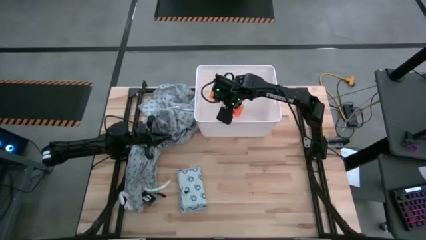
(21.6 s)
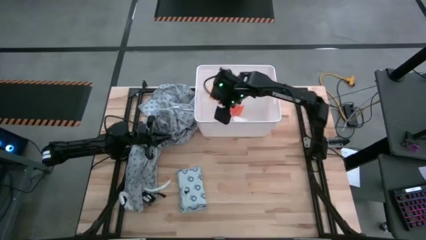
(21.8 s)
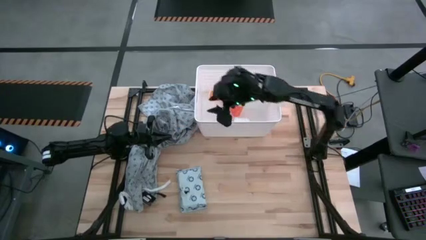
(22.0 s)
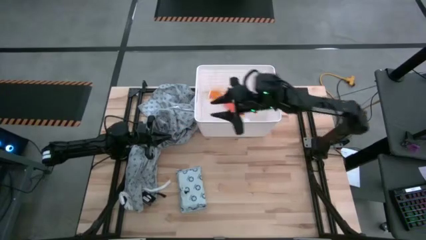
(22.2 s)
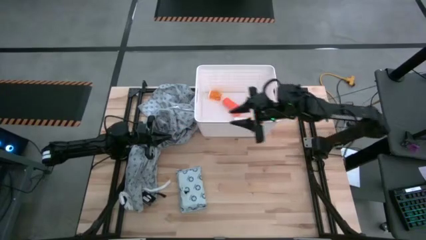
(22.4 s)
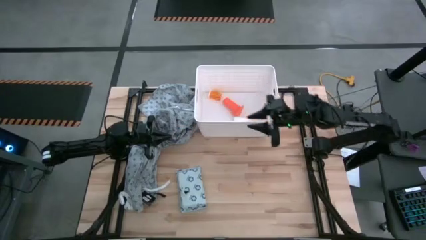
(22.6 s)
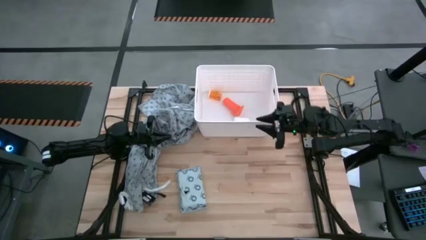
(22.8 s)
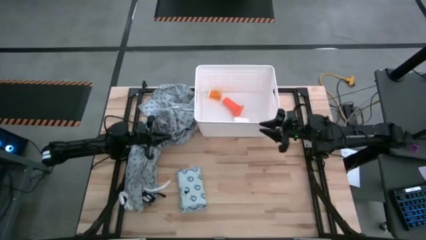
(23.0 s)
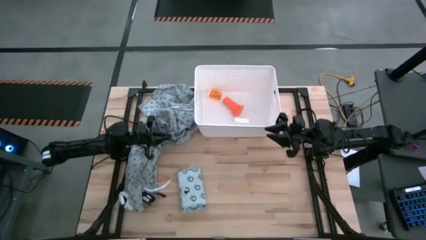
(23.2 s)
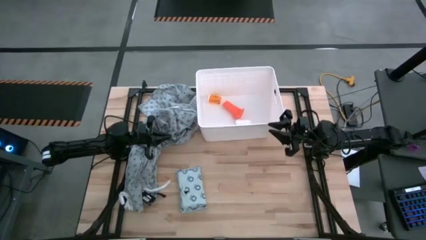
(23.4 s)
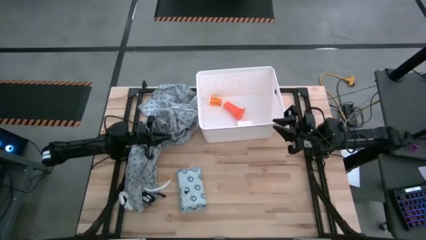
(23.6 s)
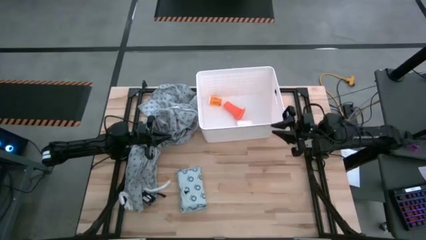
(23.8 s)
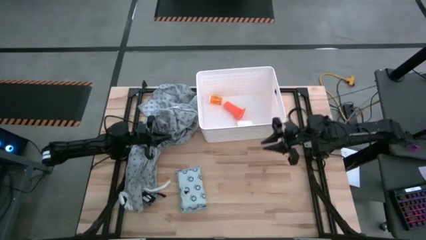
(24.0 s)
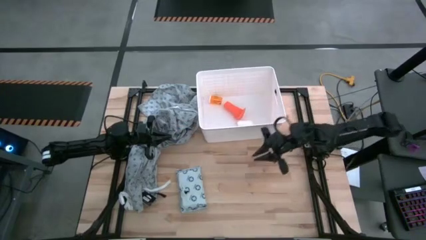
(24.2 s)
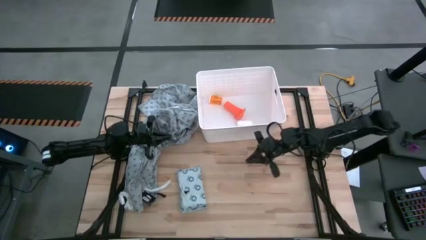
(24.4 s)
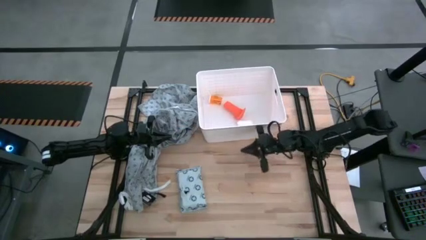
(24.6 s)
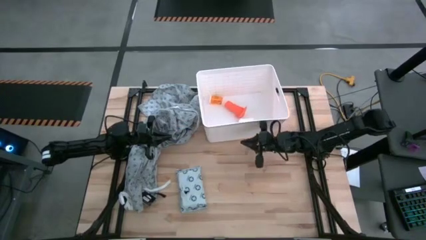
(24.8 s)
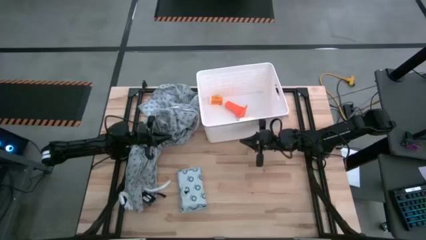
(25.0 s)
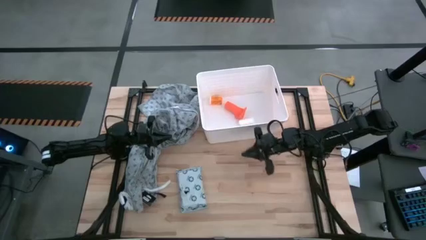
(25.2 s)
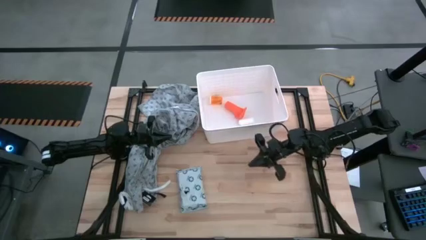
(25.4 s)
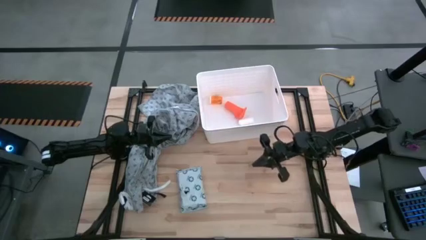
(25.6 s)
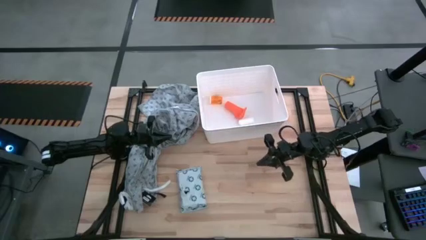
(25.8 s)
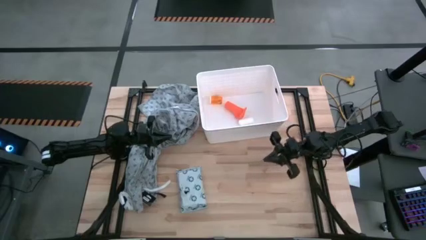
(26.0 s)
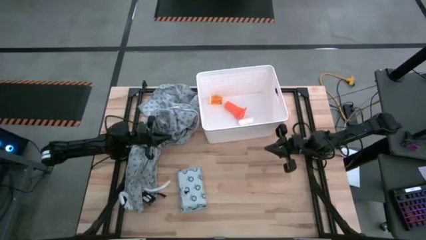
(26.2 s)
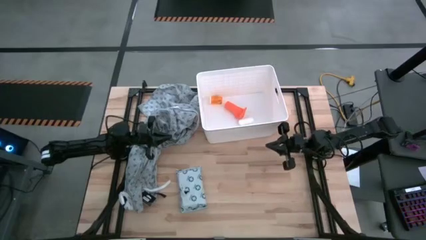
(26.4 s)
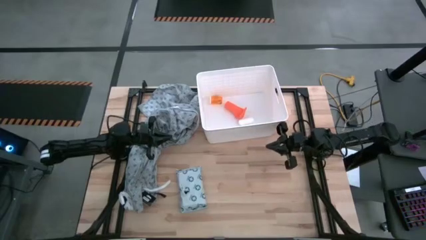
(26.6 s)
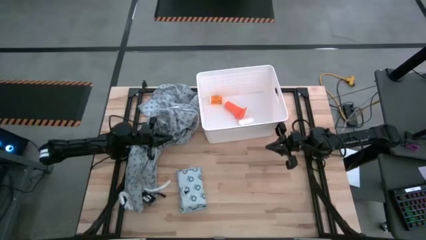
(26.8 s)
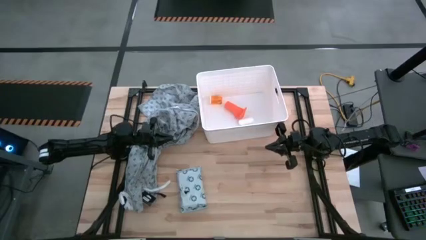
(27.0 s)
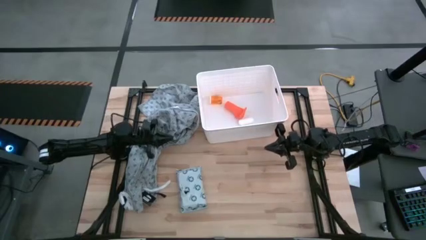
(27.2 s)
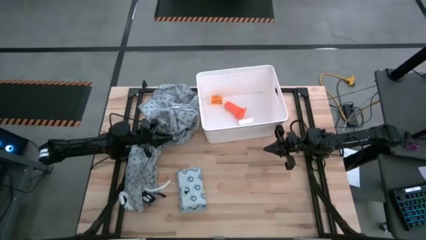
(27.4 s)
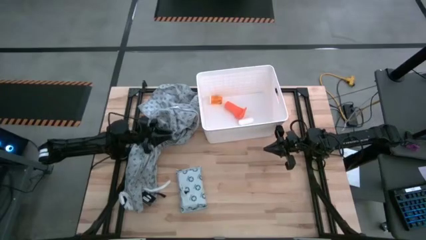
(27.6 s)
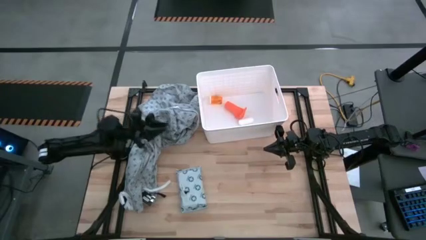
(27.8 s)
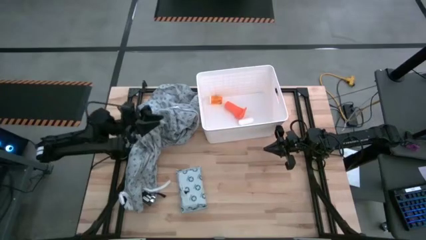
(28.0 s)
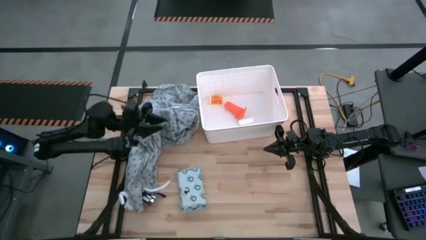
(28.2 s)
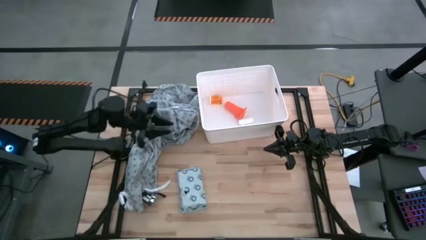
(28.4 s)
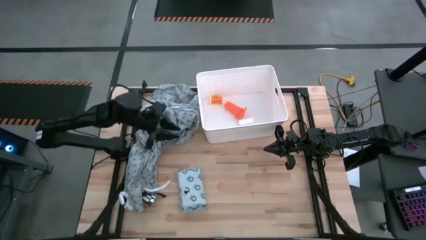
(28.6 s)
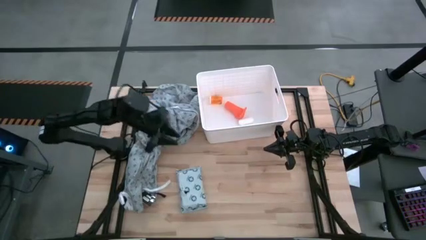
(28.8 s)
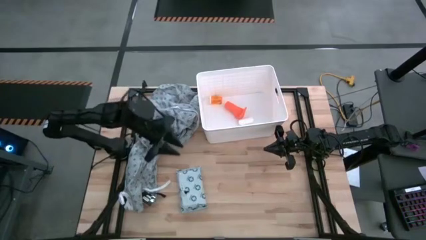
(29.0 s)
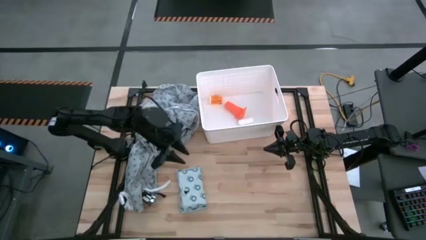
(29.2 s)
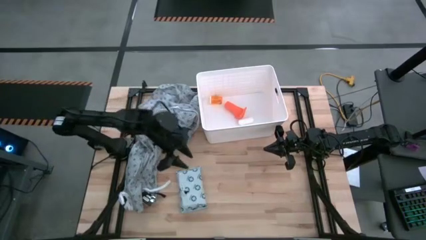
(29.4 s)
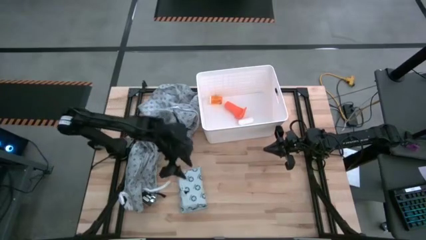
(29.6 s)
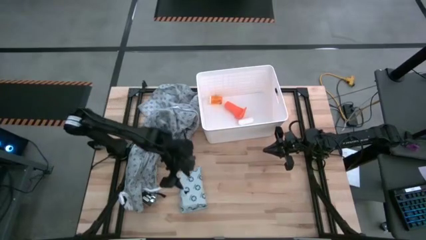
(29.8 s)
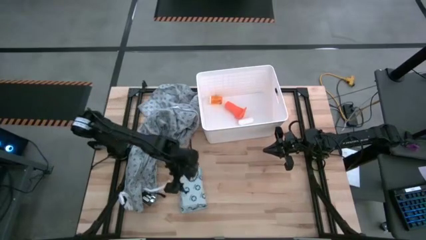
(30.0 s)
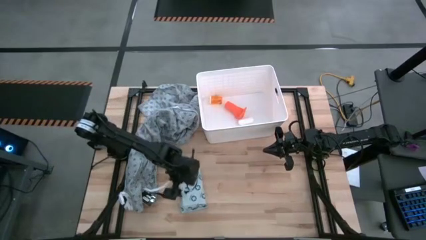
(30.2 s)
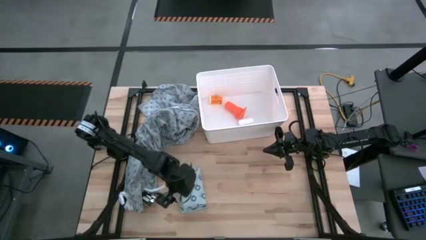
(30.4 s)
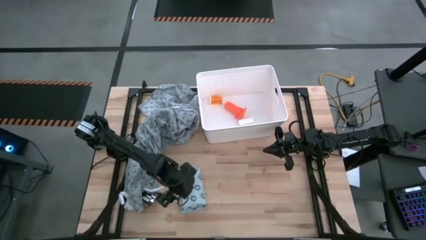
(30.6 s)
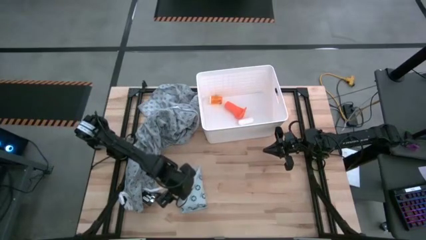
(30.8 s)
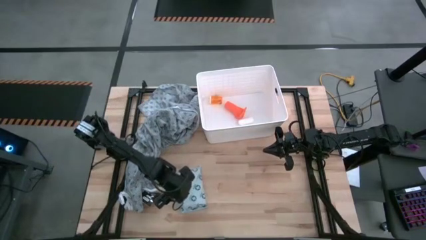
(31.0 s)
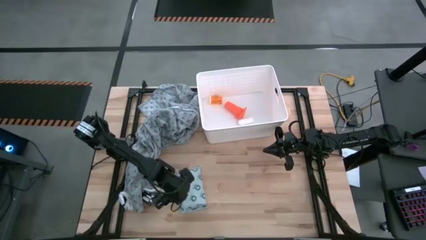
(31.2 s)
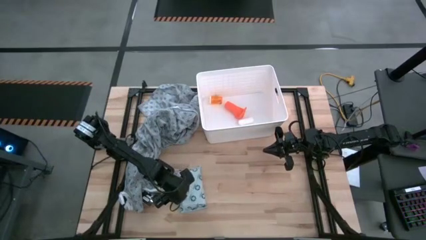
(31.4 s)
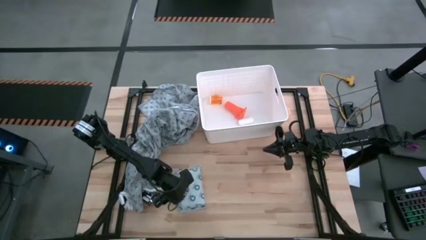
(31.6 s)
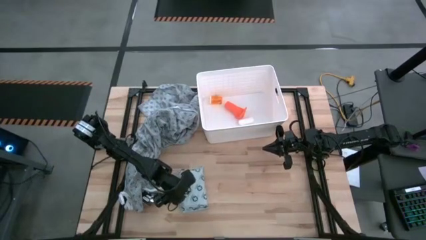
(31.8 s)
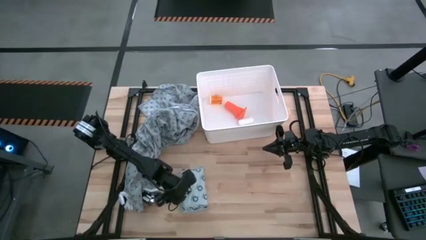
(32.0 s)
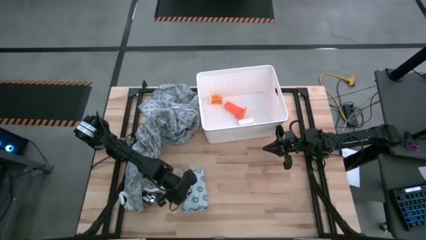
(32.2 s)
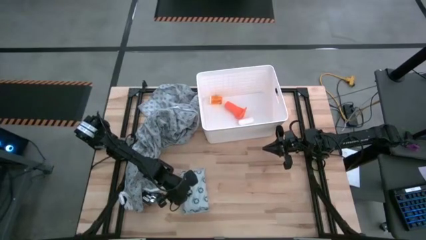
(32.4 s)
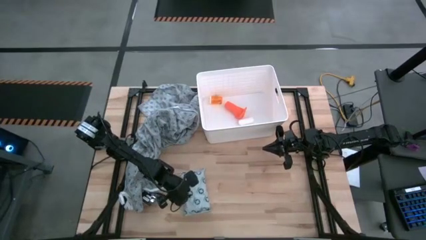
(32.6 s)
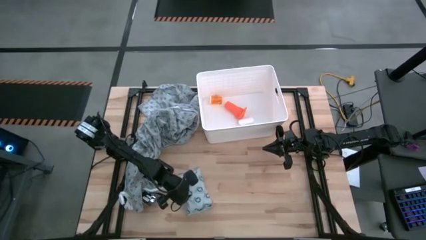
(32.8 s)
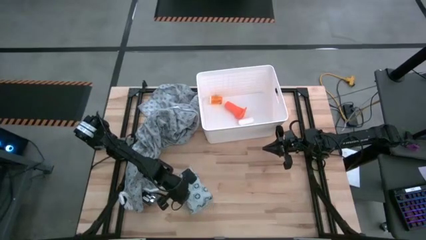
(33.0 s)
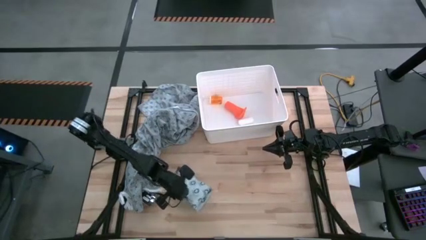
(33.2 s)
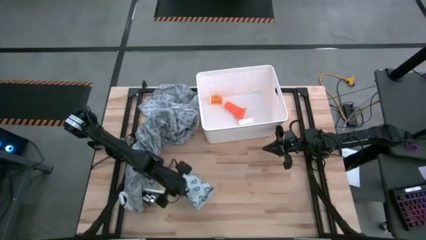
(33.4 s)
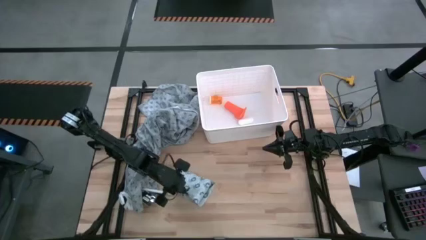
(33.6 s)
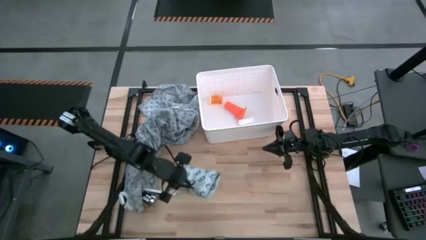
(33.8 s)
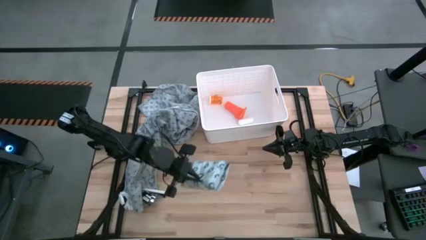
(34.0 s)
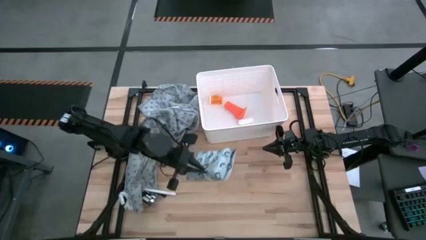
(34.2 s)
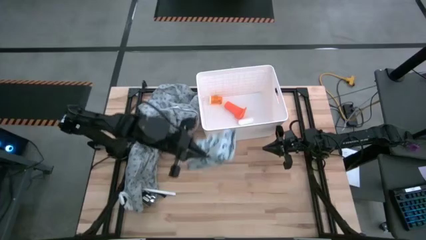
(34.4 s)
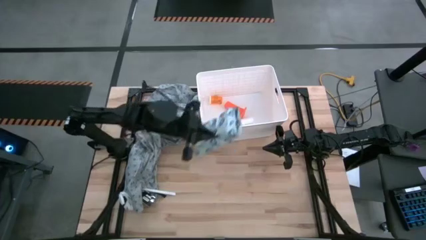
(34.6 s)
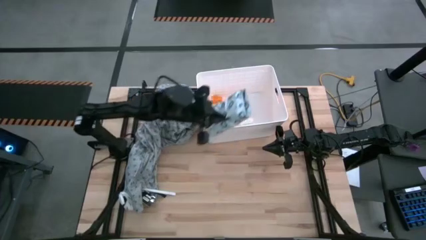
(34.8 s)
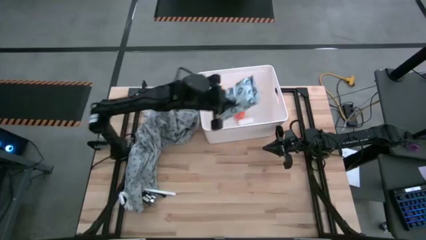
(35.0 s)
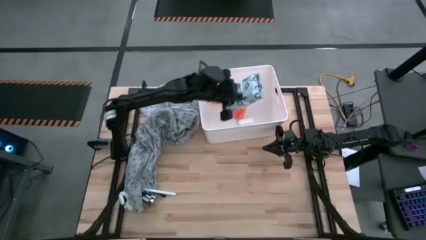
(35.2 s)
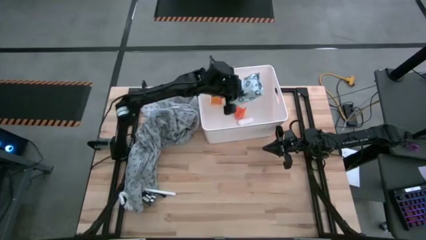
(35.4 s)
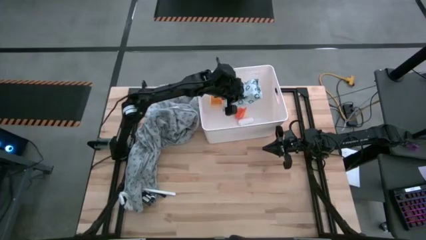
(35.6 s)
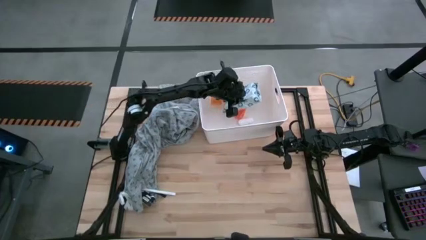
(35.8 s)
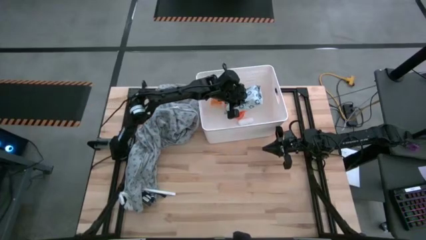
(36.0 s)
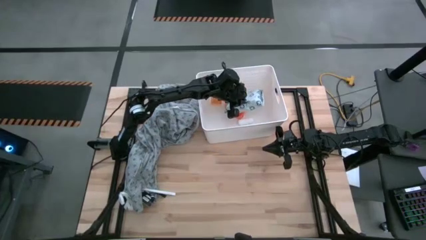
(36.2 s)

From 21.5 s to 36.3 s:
Task: Pick & place medical supplies in basket/bin
Put the mailer bag into the white bin
